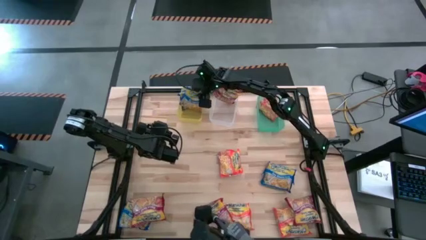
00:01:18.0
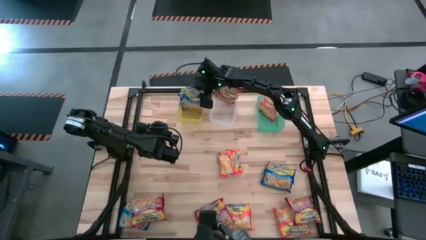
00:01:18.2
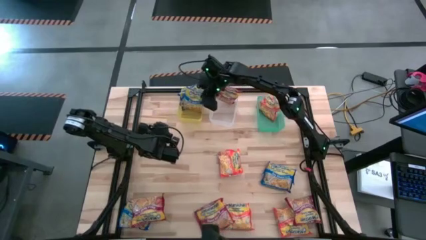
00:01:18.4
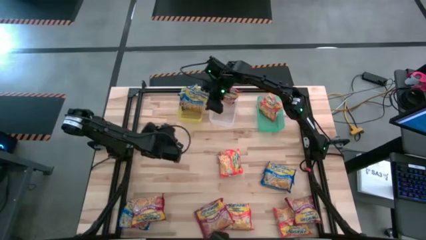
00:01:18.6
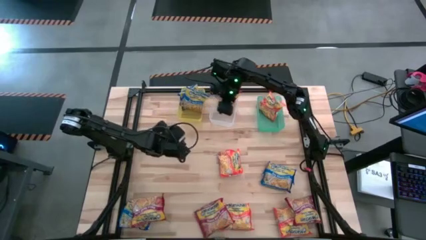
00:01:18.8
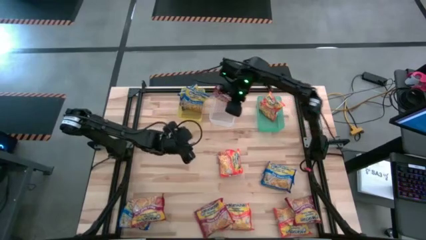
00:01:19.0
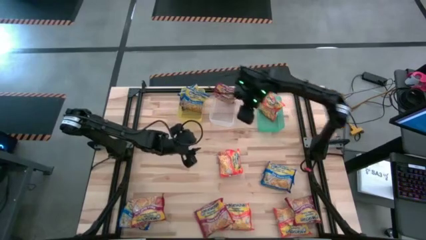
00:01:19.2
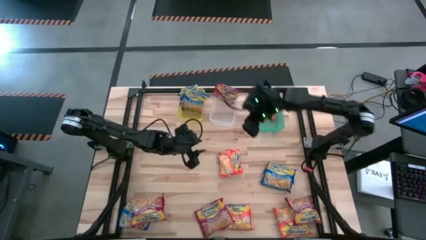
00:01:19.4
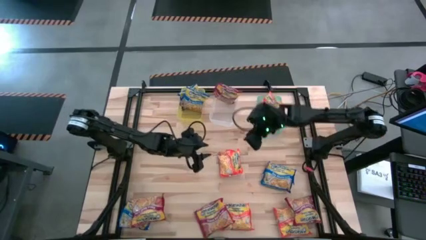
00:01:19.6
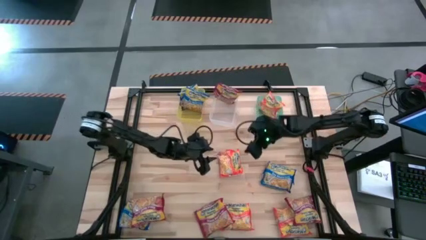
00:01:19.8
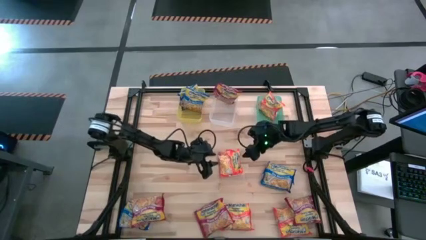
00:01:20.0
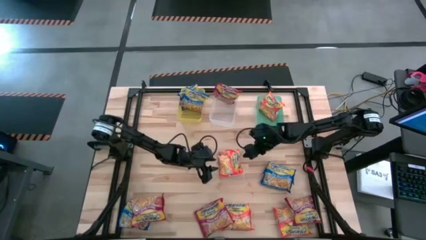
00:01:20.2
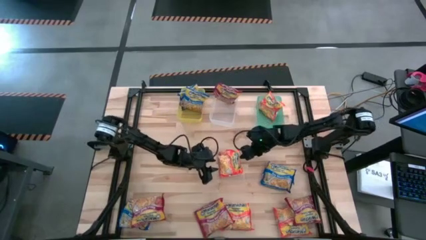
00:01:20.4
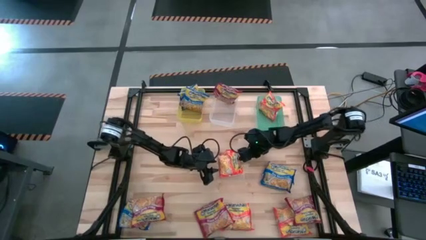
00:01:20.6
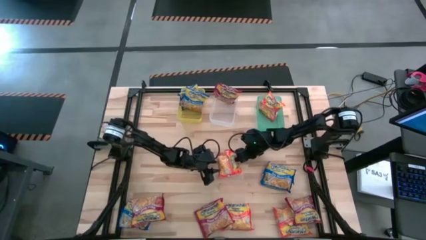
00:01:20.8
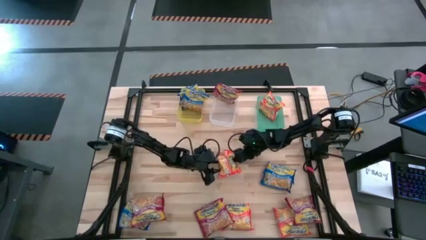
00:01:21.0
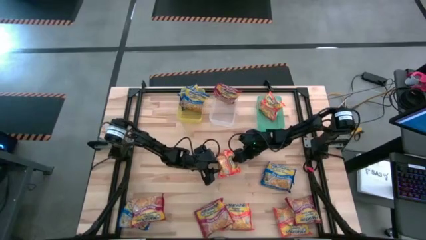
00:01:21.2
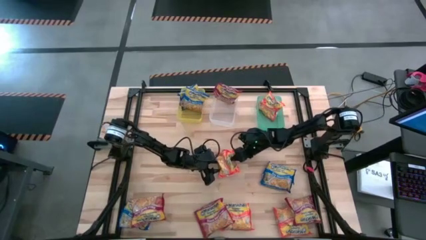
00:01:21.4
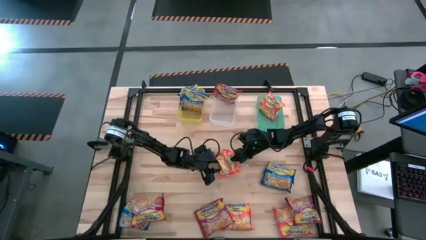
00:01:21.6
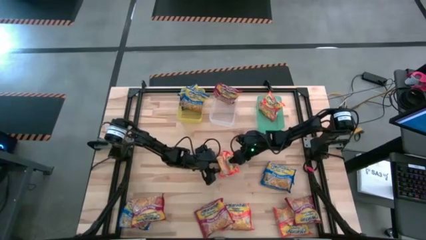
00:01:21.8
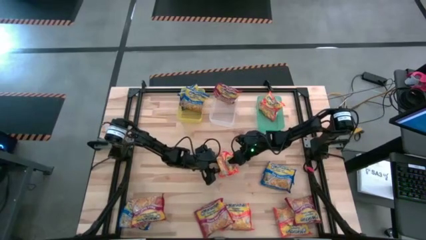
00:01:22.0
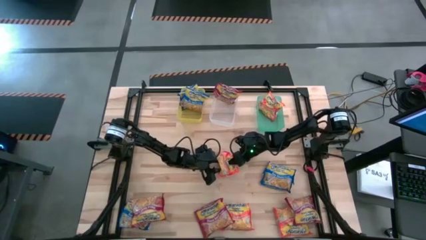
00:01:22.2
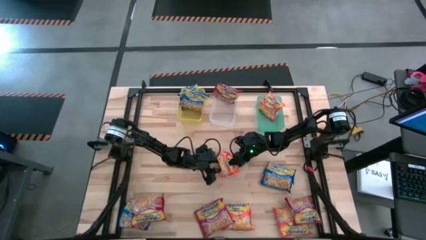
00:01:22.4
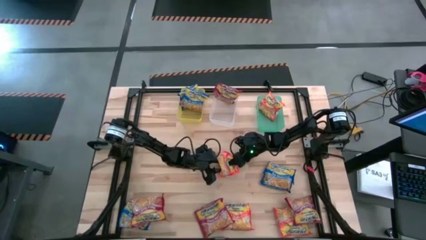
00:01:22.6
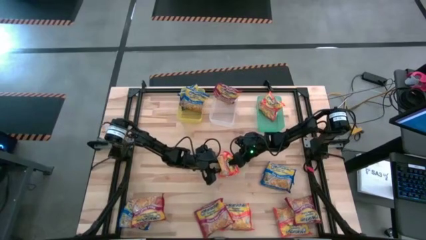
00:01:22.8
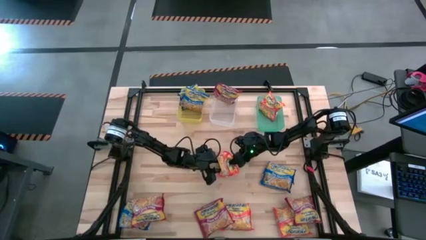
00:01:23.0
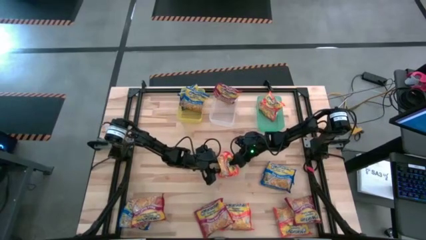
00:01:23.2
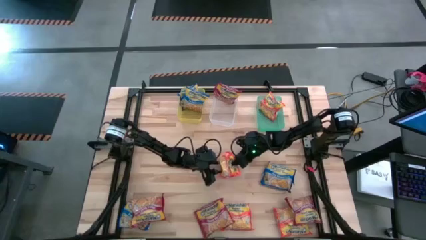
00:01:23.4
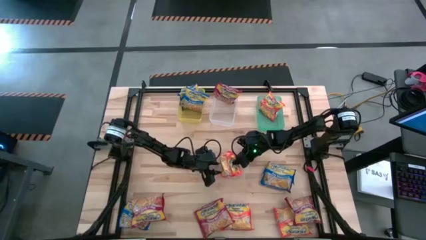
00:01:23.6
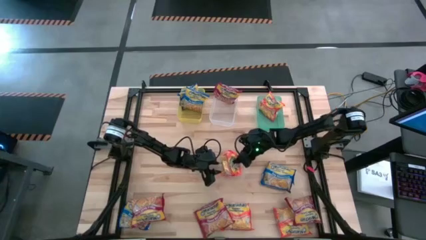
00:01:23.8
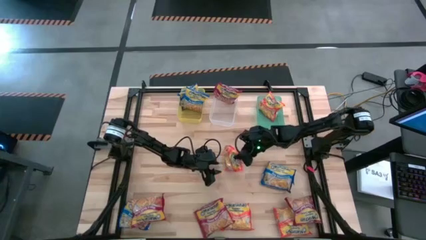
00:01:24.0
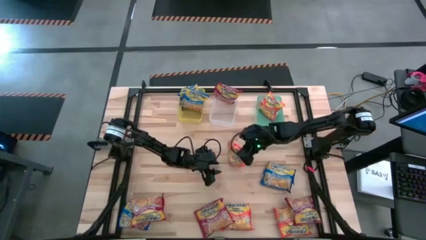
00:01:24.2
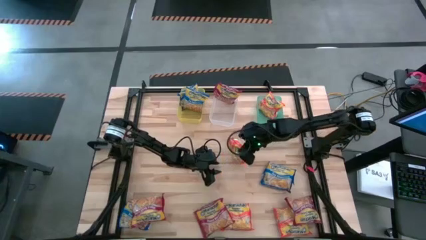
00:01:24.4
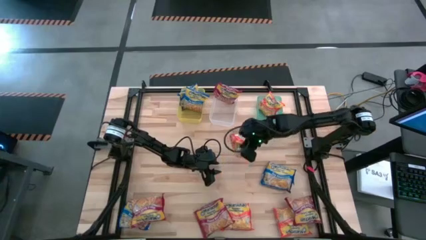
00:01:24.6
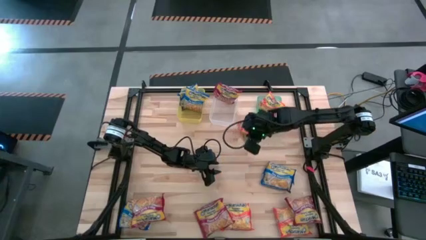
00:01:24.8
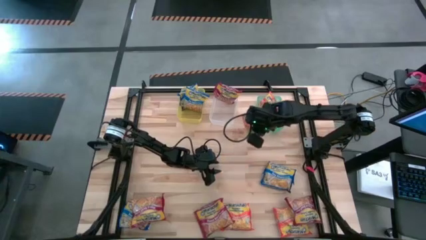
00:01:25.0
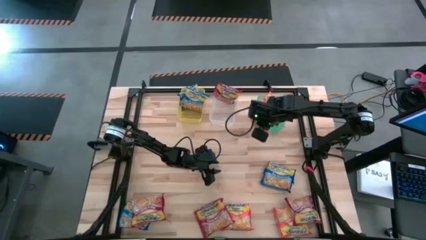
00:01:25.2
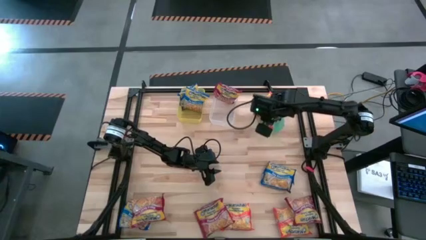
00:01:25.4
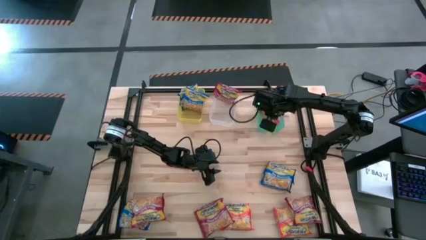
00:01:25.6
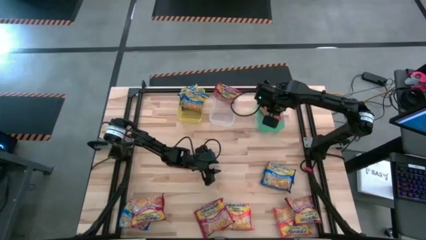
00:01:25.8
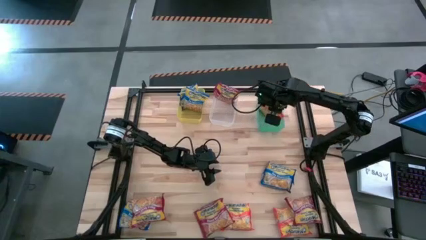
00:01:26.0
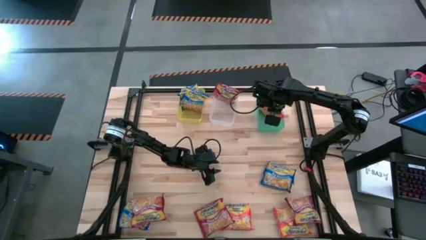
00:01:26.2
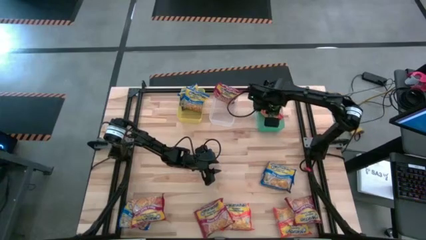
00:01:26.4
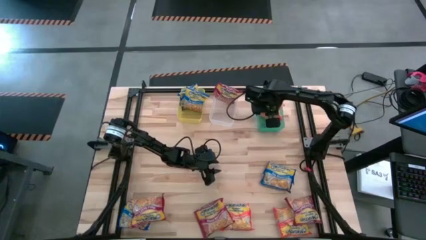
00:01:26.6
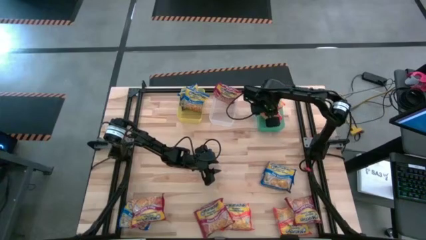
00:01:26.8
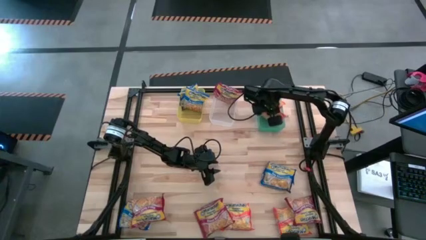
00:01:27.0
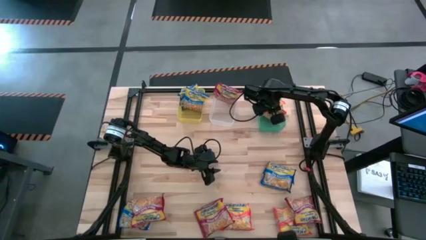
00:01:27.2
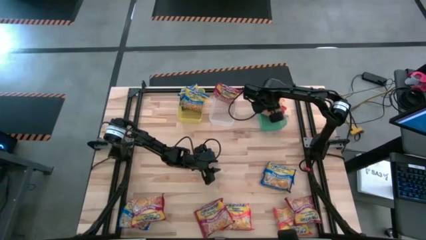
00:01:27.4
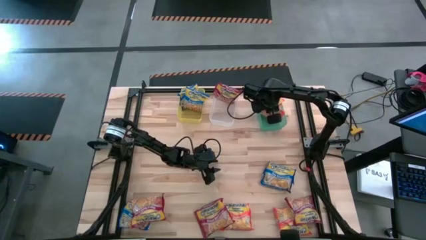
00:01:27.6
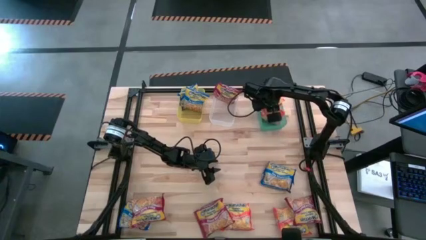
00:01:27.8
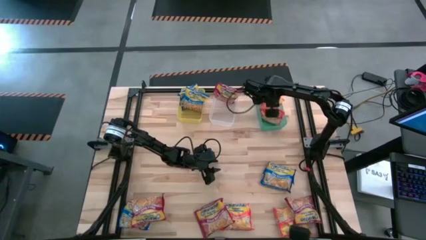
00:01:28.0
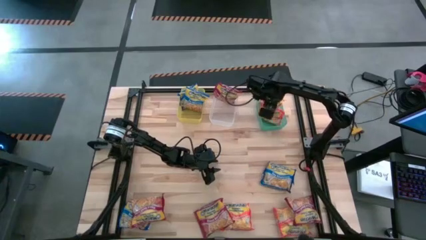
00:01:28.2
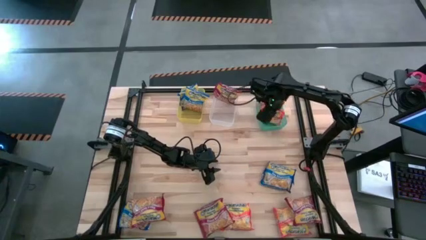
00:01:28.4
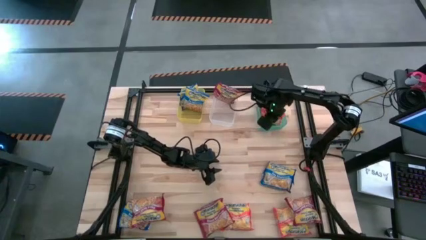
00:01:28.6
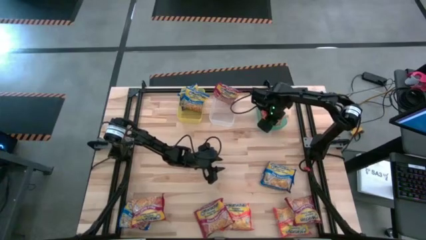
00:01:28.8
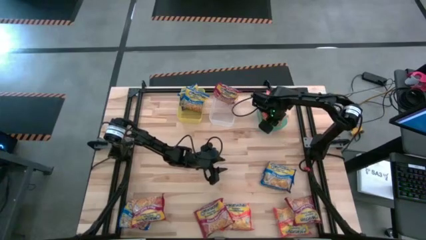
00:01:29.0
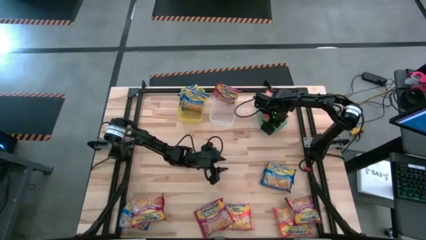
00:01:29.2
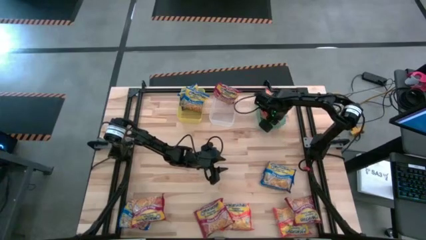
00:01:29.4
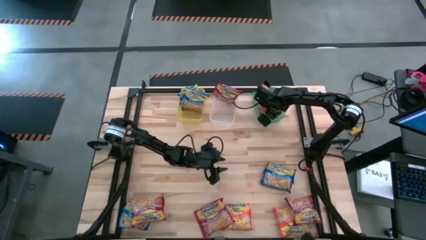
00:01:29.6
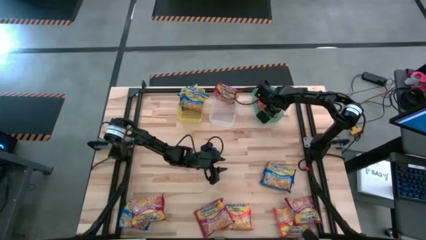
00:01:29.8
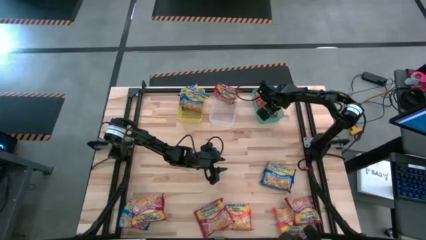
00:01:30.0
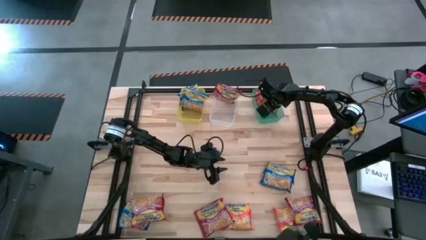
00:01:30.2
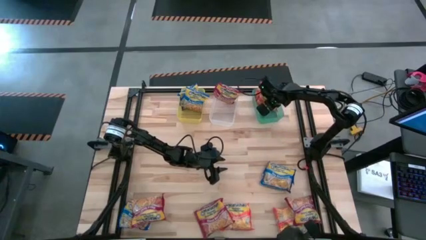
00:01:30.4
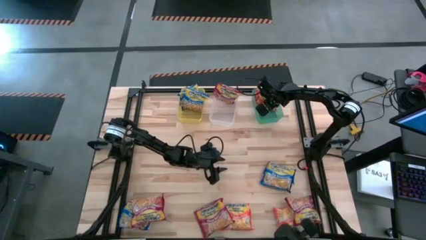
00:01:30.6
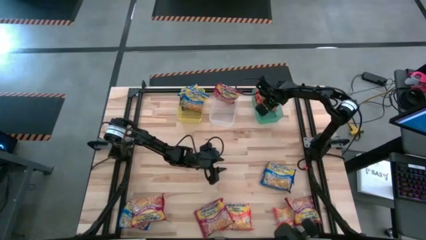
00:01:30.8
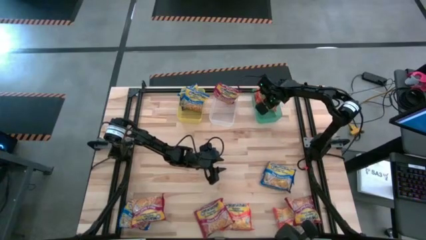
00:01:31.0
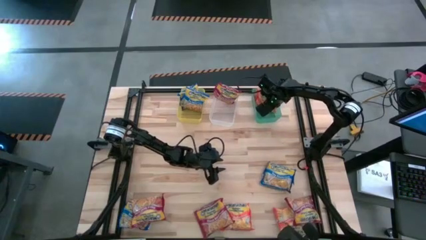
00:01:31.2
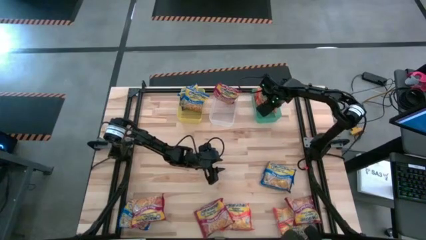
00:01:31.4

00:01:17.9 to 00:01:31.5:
Task: Sort Maruchan noodles
Put the top orange noodle pack into the green bin

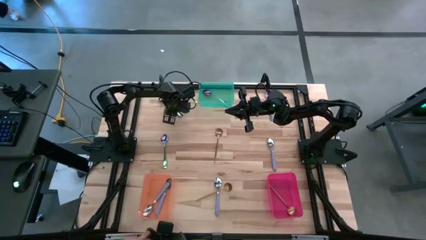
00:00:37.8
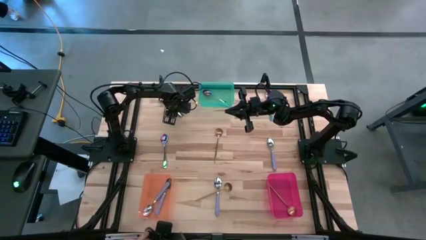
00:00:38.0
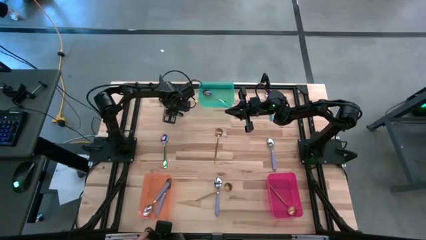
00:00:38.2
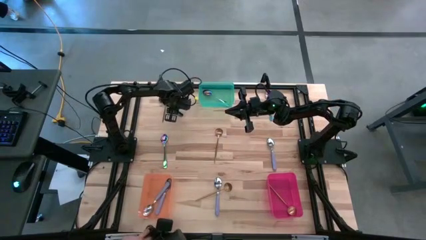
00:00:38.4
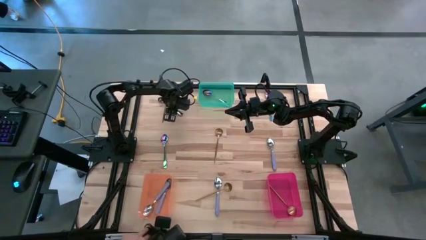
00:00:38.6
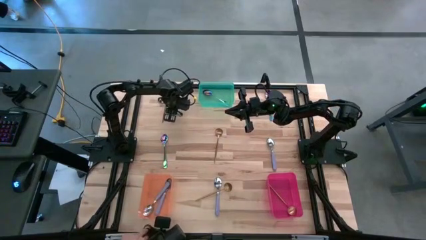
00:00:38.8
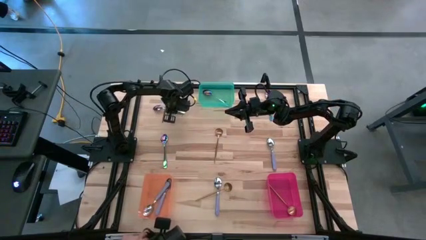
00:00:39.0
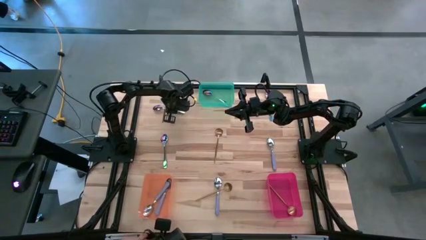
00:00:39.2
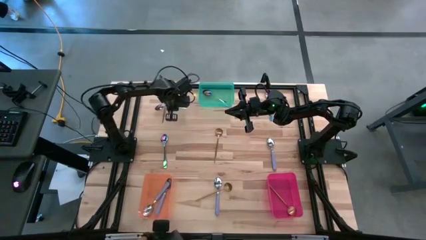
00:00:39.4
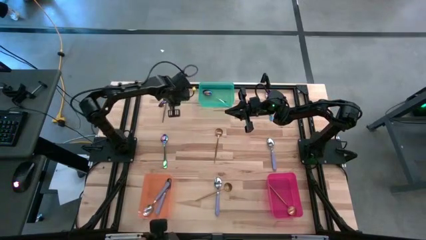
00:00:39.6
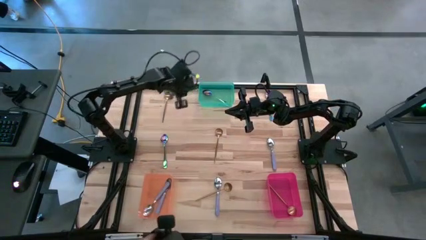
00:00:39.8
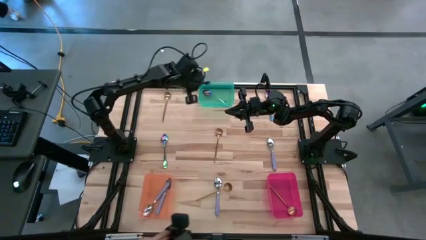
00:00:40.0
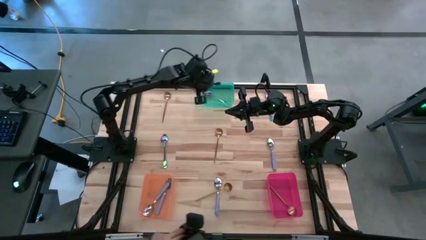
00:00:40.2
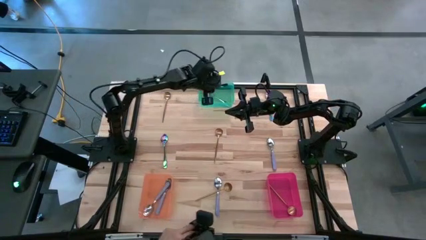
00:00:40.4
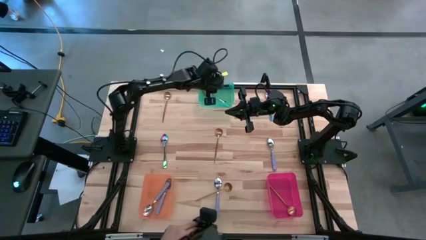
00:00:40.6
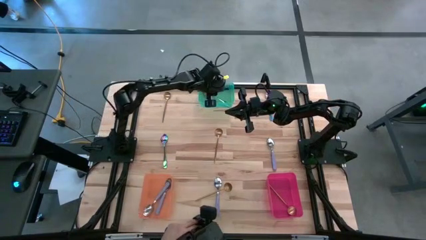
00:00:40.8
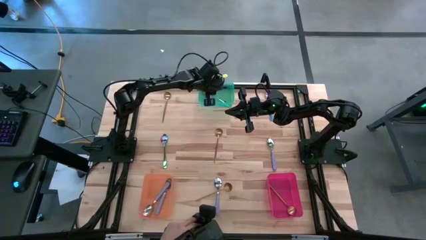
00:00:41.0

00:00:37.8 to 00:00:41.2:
Task: Sort silverware by color (type)
Put the violet spoon into the blue bin
